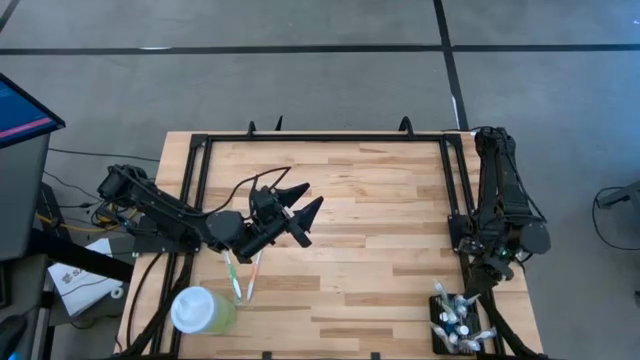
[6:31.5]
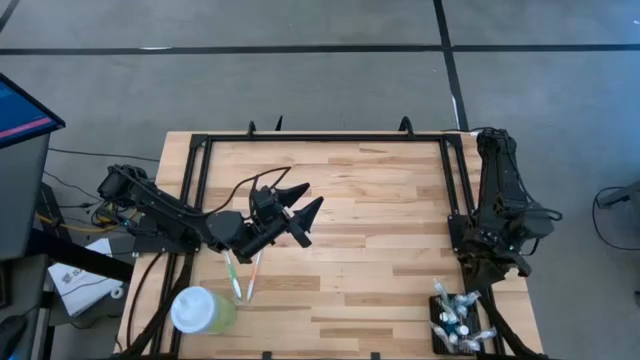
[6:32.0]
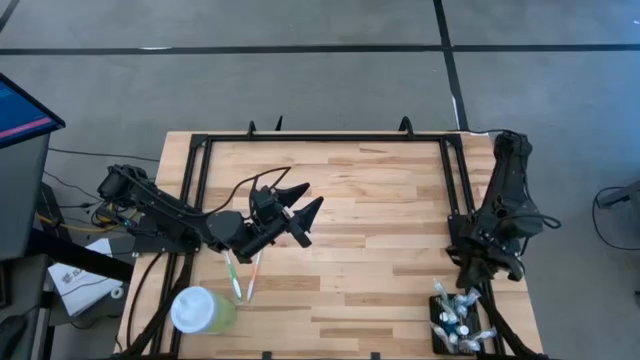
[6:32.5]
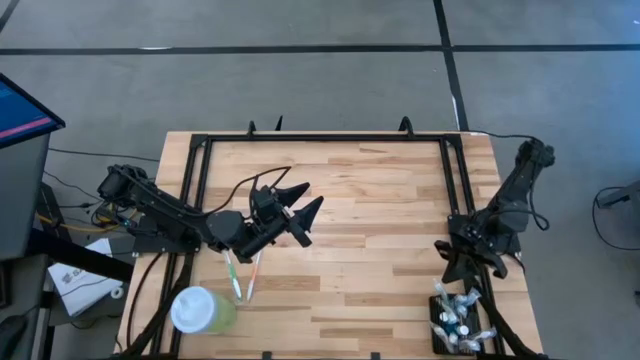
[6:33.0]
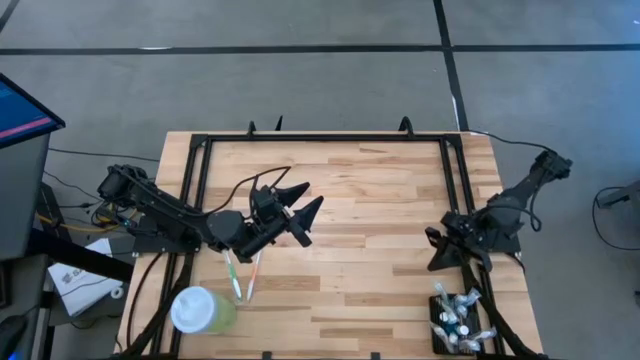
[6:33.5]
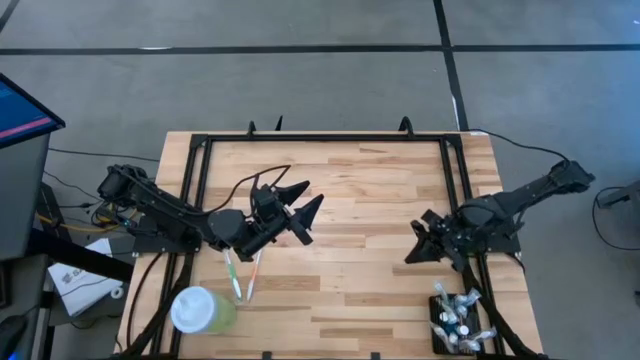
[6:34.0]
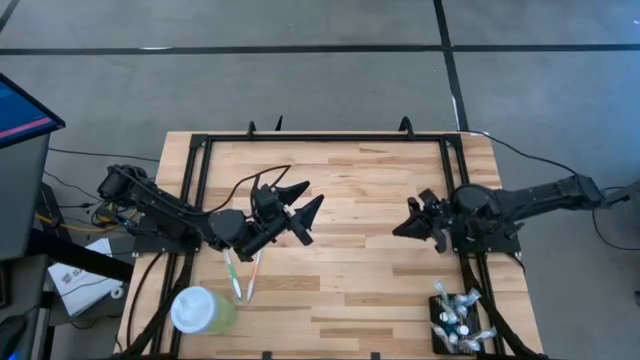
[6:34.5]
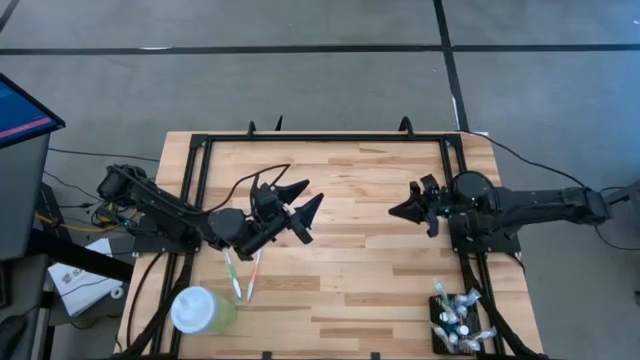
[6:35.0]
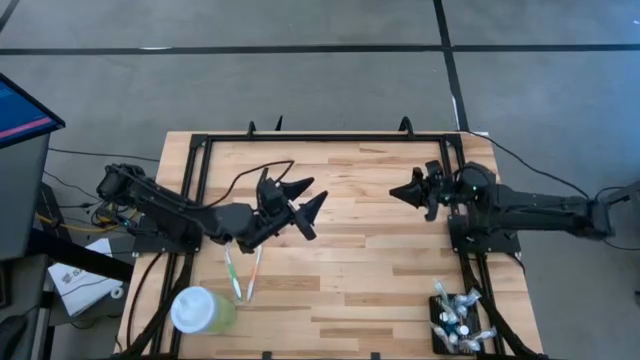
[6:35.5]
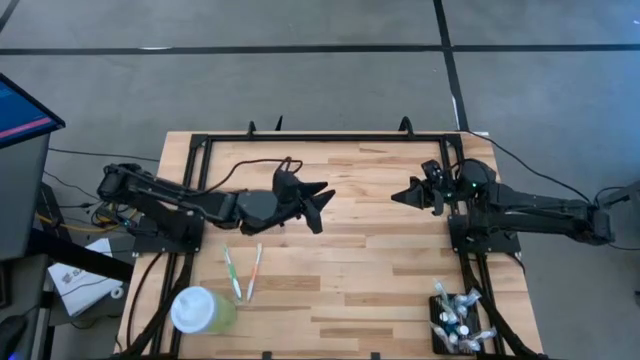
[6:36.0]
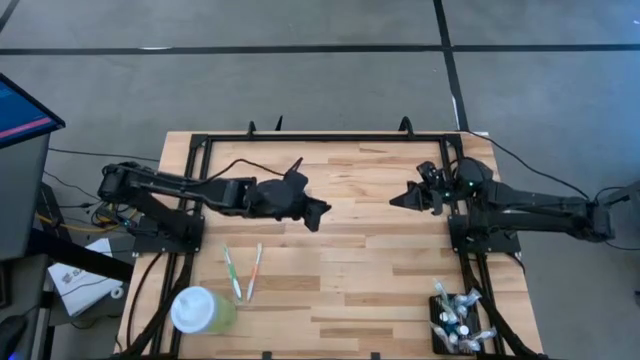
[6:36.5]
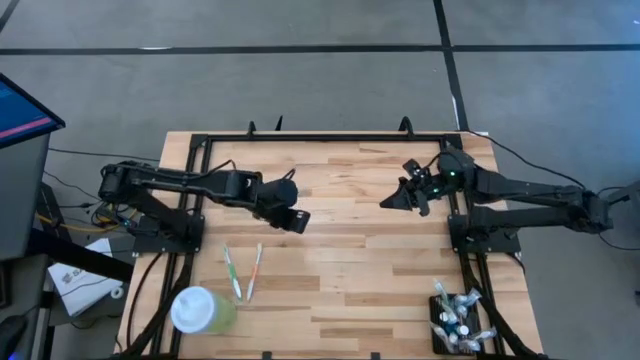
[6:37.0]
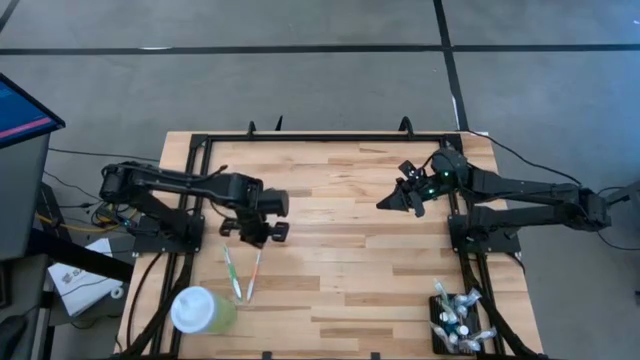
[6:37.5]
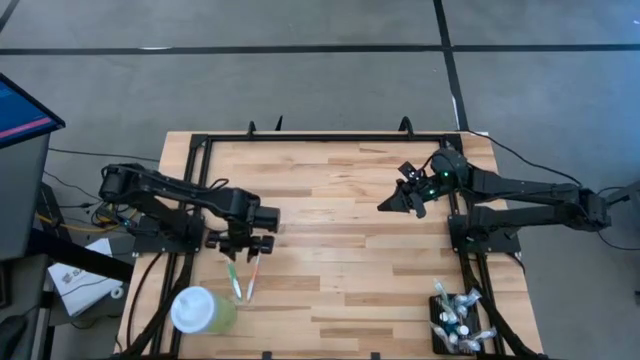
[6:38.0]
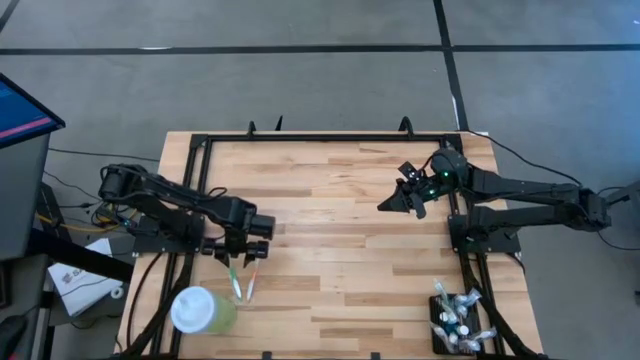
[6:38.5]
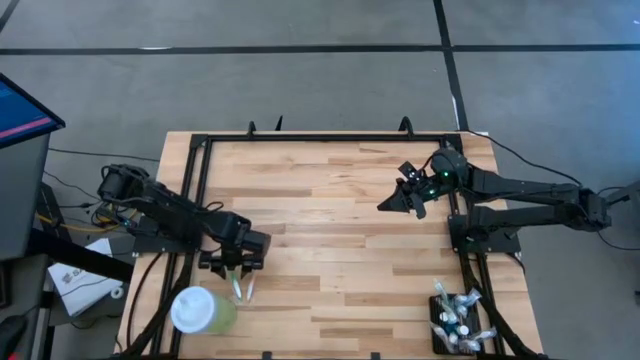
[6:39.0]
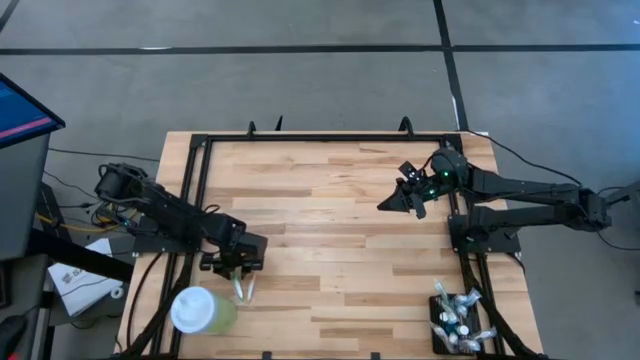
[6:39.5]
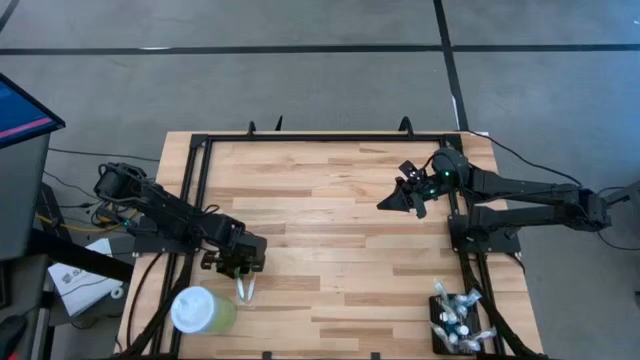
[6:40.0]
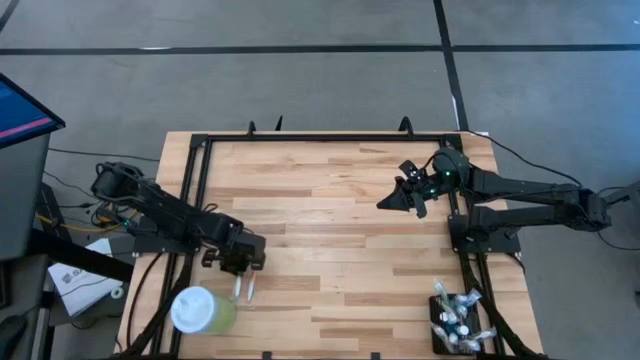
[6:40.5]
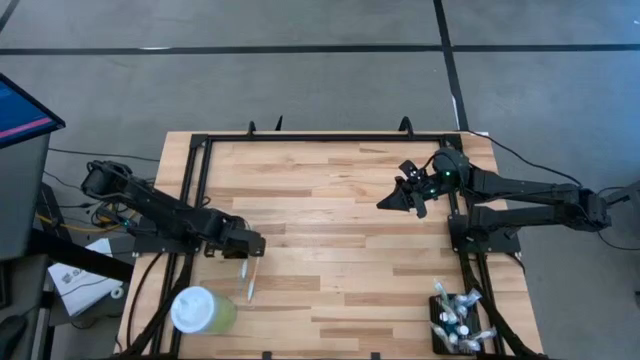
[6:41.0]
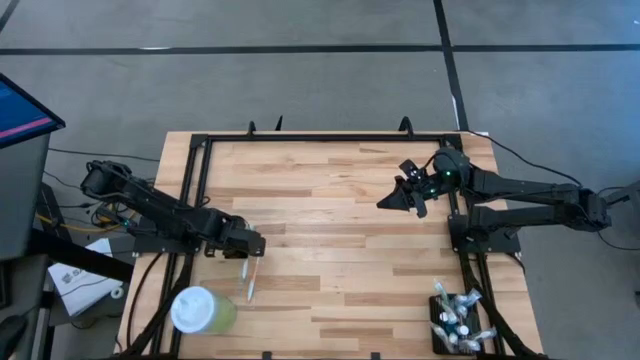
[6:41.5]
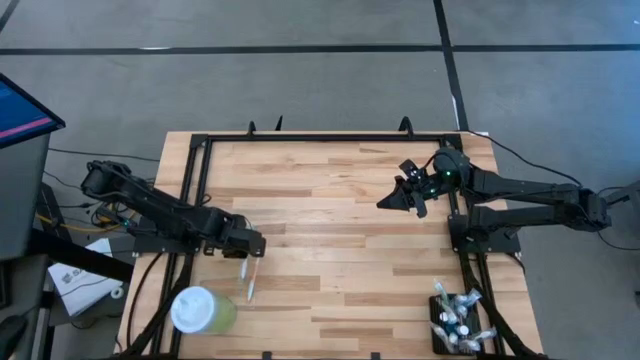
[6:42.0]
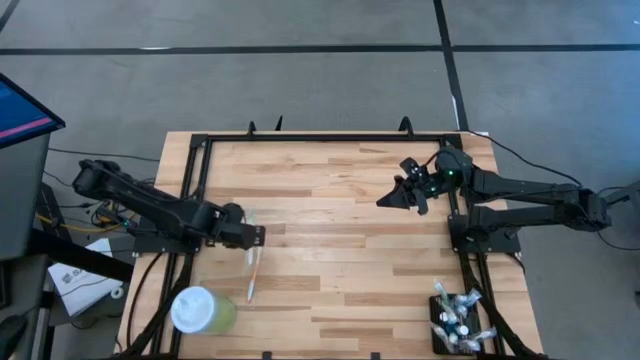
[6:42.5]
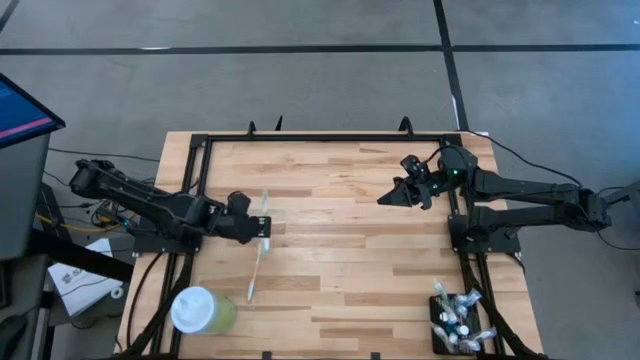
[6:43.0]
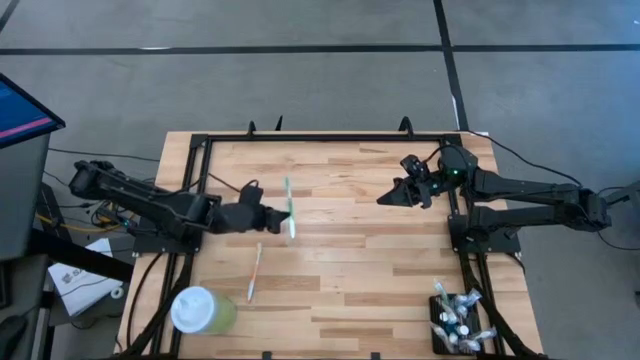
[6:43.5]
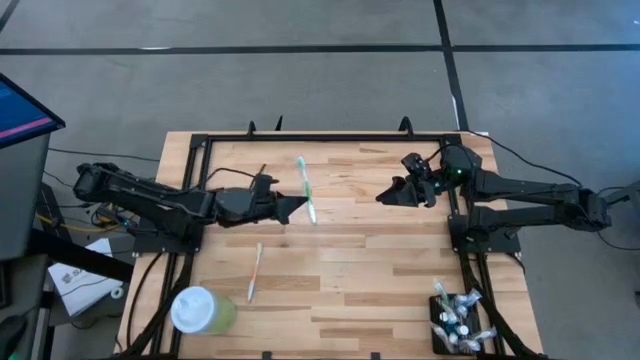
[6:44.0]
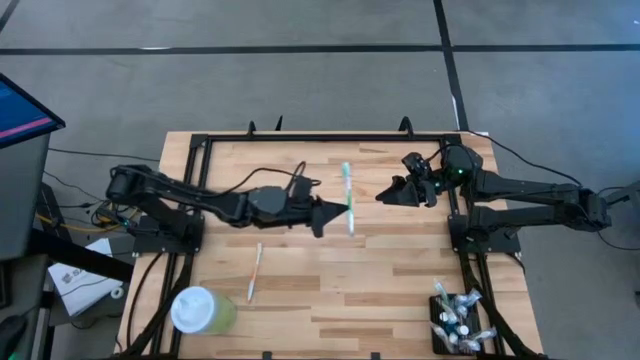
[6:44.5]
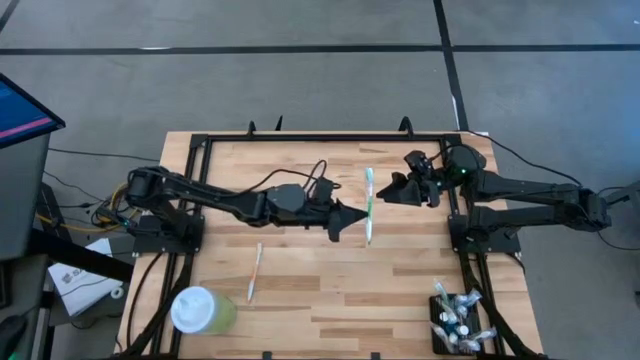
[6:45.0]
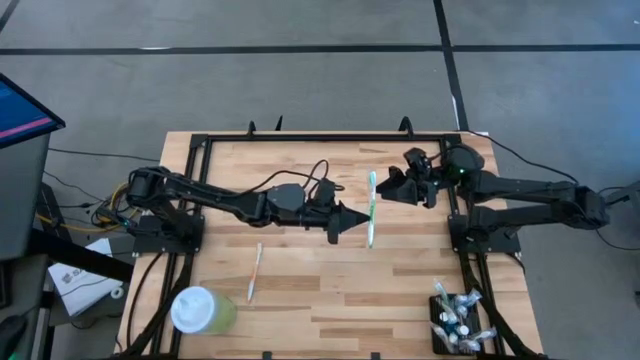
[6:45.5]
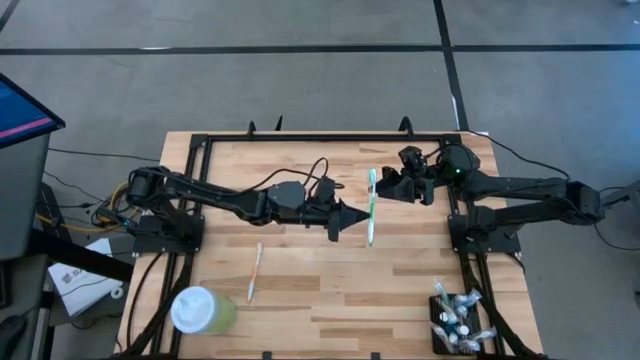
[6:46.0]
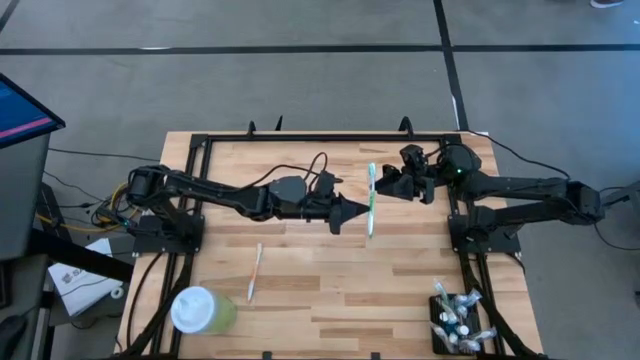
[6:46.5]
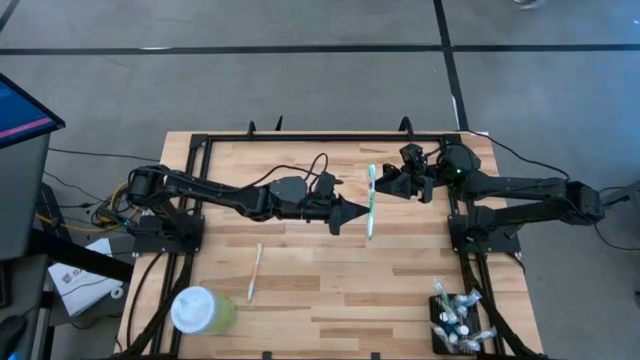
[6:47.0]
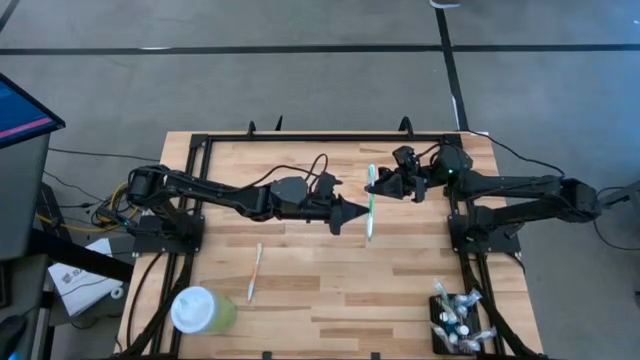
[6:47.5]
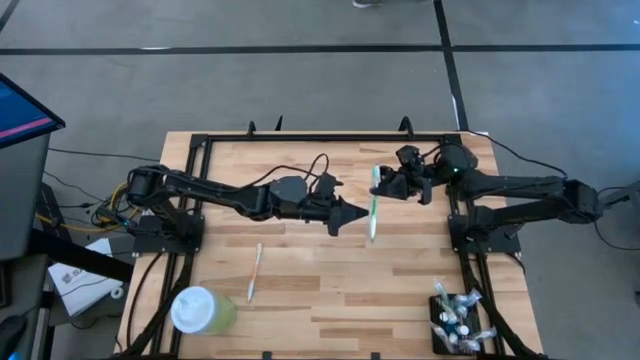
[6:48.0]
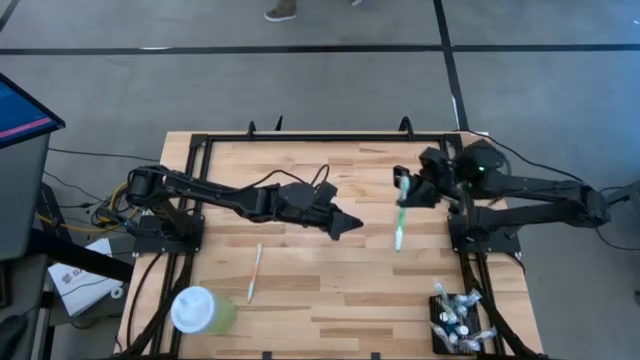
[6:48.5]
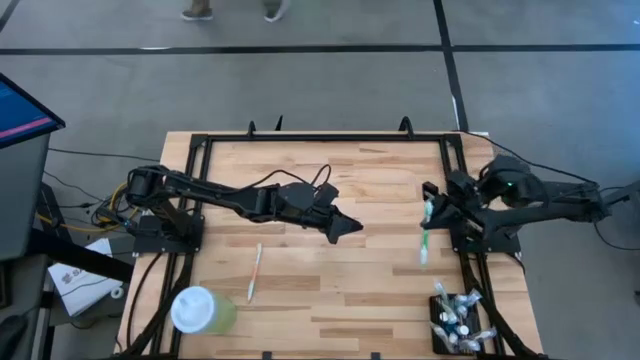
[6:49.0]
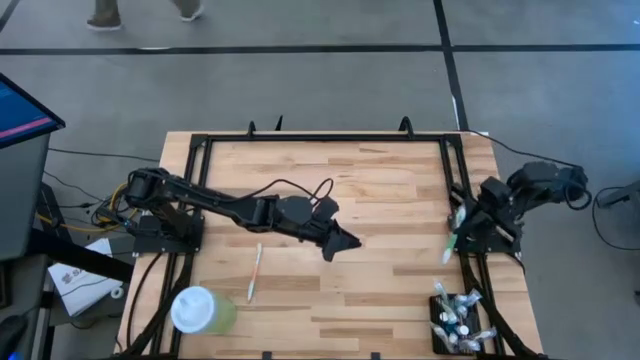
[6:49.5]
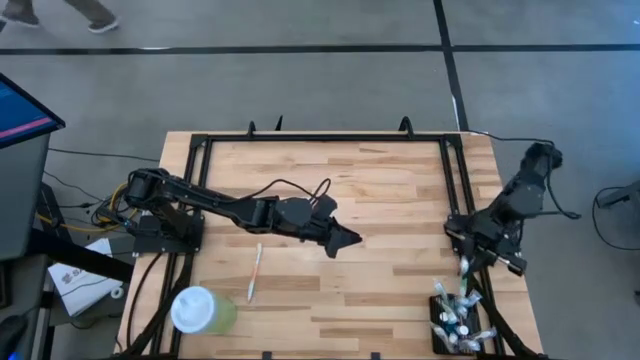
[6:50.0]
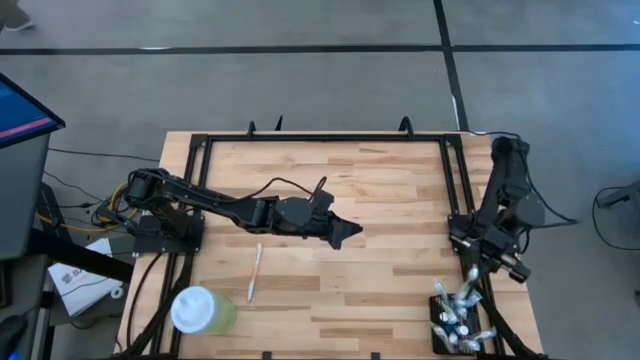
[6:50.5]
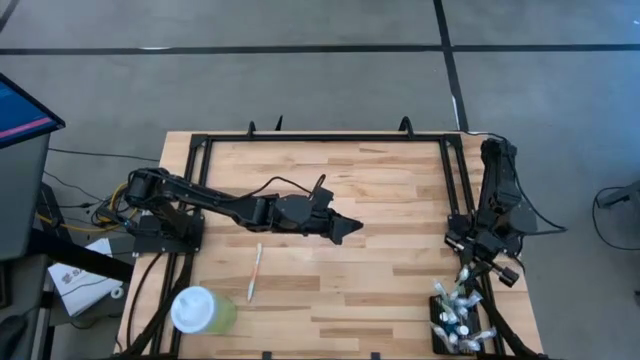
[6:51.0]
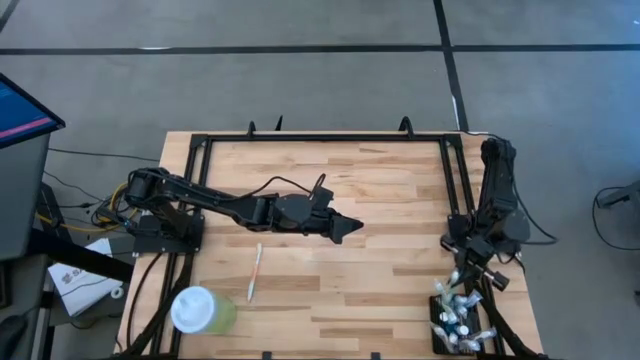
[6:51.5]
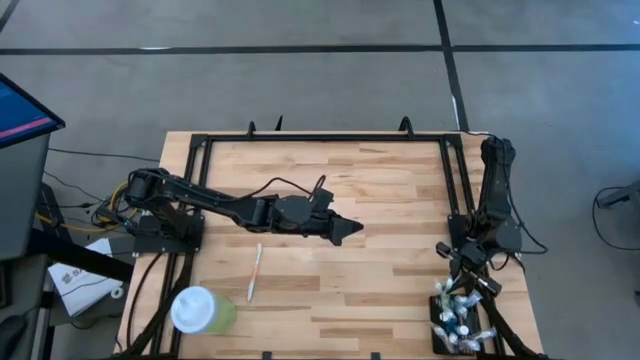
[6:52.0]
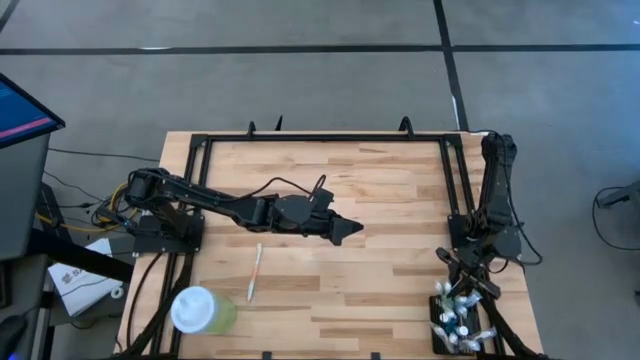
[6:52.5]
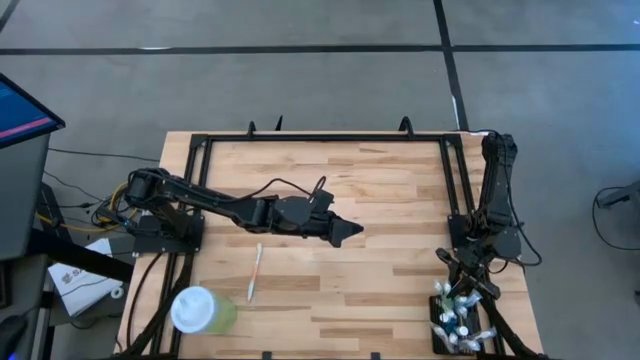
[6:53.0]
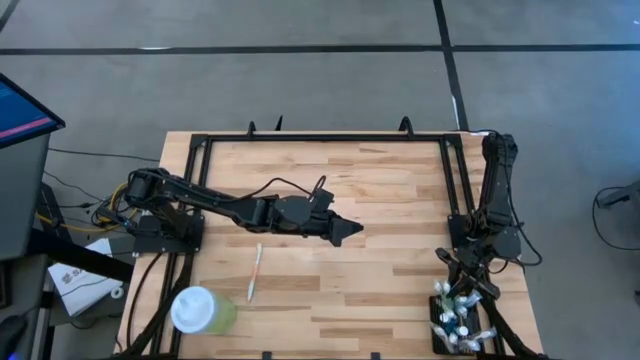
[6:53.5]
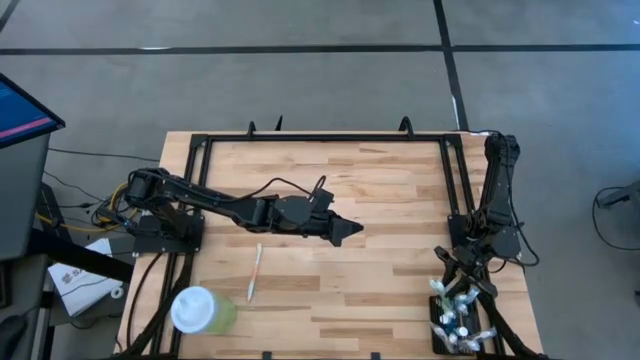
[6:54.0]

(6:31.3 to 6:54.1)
Task: Pick & Place toothbrushing station
Put the green toothbrush into the black organizer
